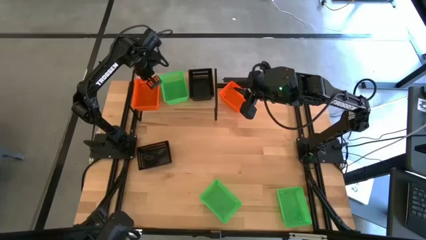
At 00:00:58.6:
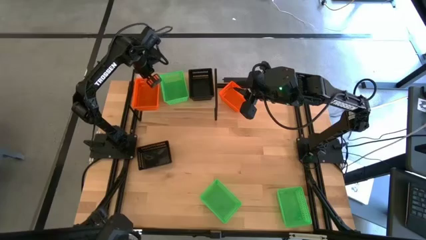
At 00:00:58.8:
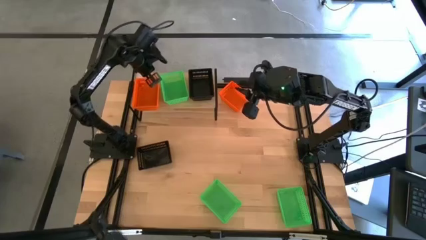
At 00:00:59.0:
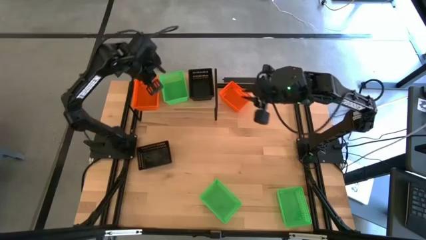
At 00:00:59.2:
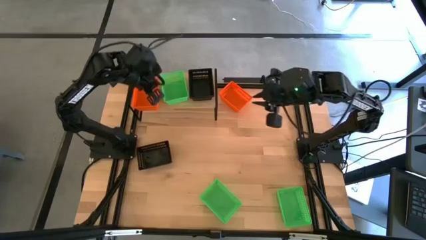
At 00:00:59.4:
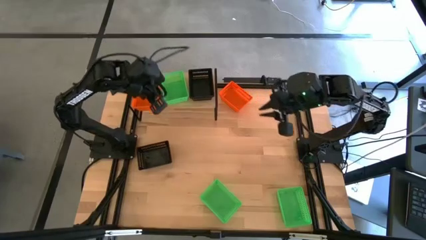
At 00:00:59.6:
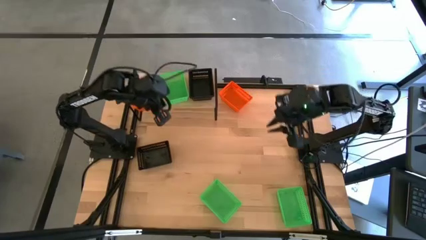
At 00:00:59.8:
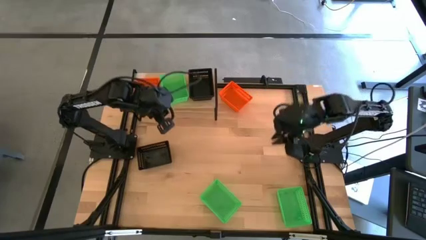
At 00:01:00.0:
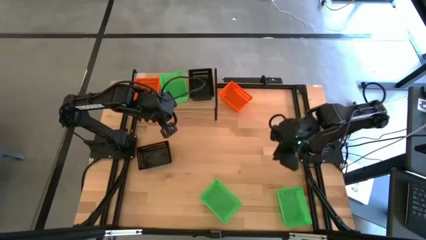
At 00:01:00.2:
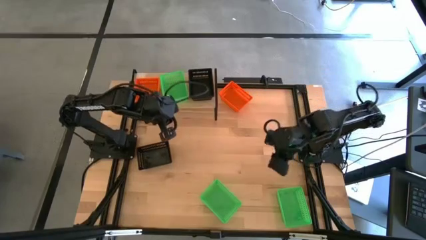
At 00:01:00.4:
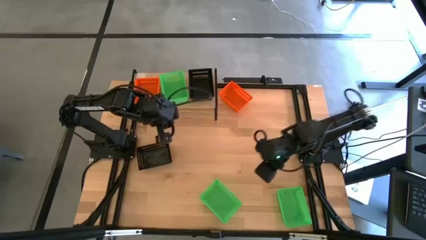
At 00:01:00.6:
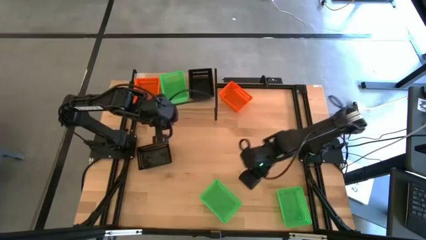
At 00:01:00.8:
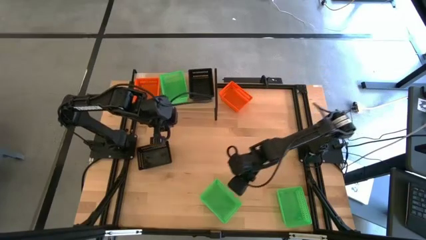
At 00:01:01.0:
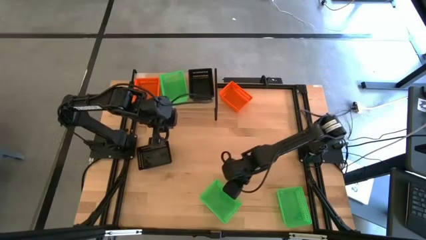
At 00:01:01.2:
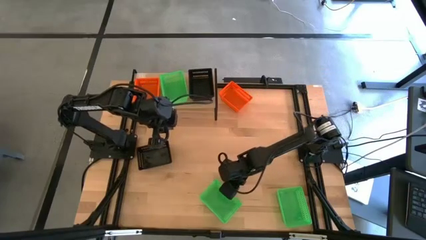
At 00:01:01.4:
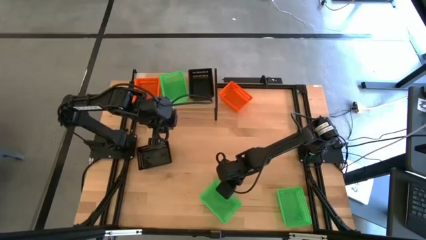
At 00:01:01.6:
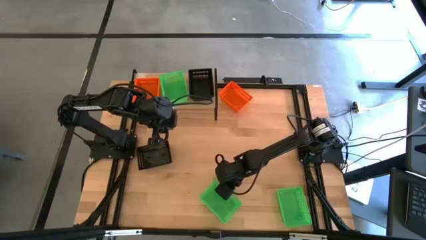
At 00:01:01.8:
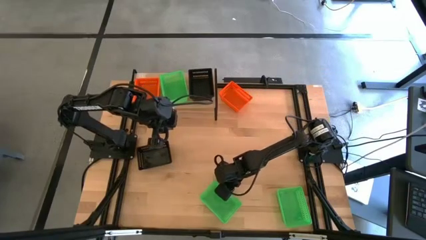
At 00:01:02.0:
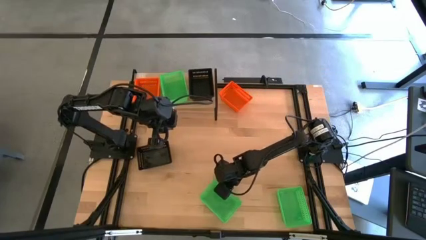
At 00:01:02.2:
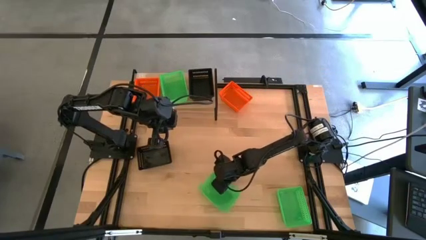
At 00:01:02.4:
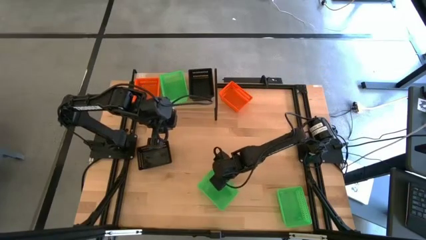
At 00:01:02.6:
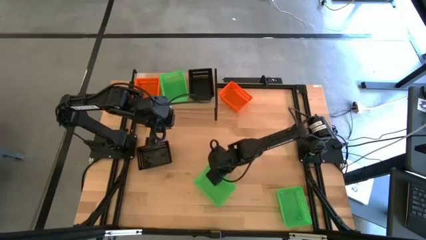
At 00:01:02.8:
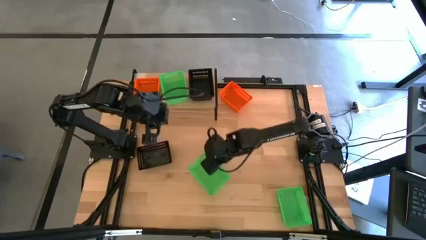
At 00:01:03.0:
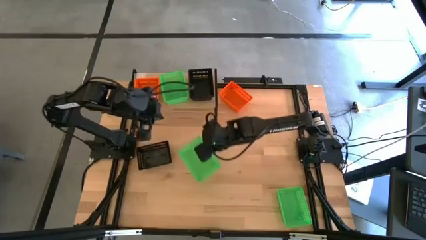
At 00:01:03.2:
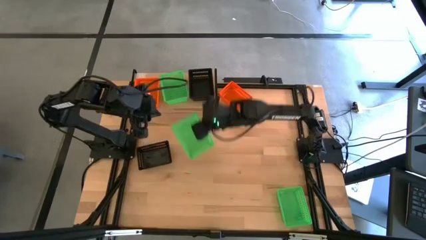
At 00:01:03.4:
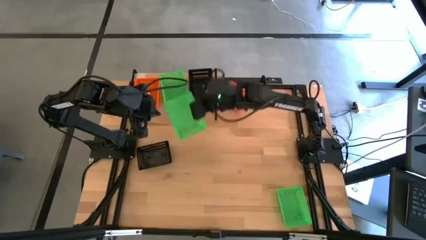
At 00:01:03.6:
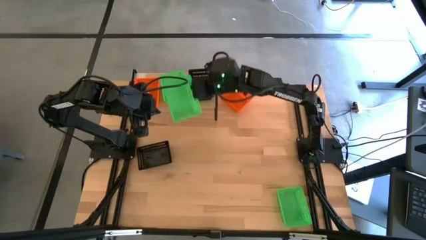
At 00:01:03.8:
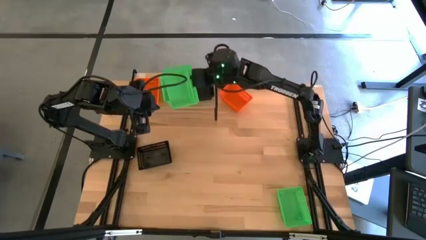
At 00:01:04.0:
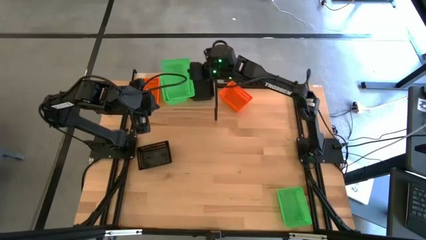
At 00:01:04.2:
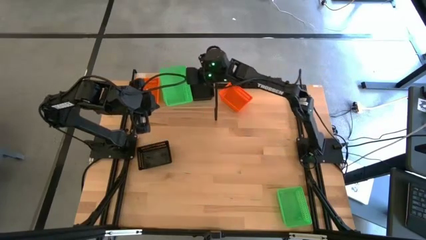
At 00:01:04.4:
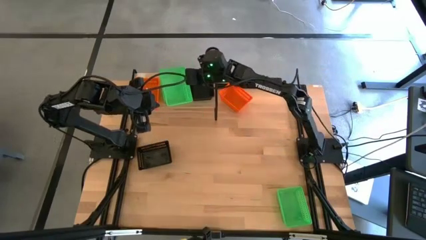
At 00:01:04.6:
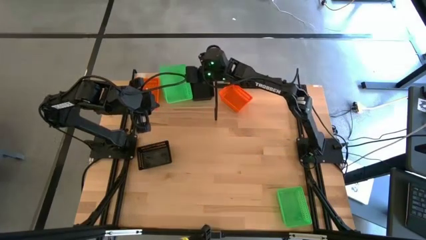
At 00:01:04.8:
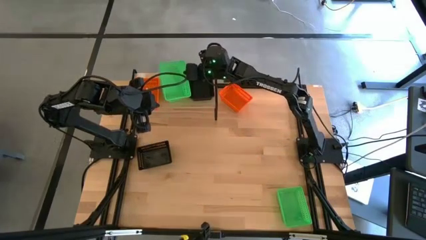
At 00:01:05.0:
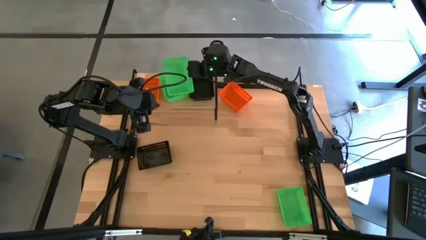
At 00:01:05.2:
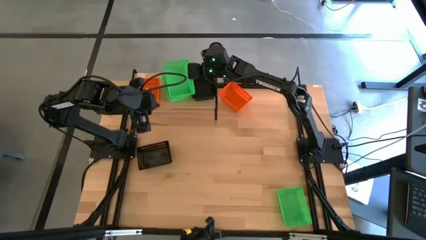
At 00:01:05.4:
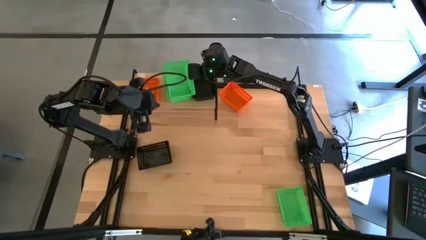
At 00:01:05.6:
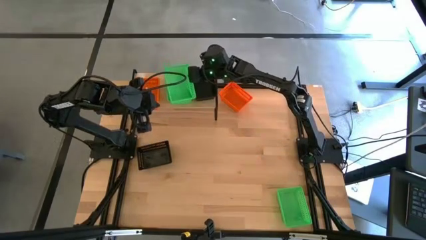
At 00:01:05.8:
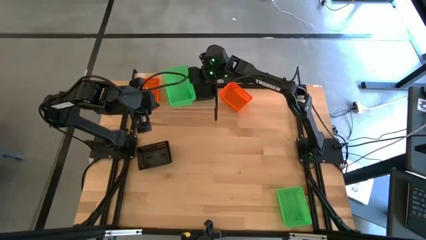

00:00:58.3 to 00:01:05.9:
Task: Stack baskets on shelf by color
Stack the left green bin on the green bin on the shelf

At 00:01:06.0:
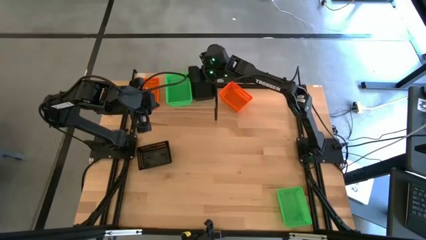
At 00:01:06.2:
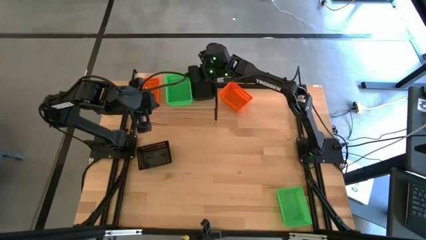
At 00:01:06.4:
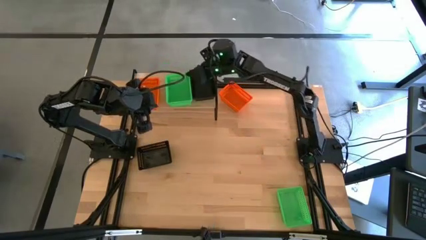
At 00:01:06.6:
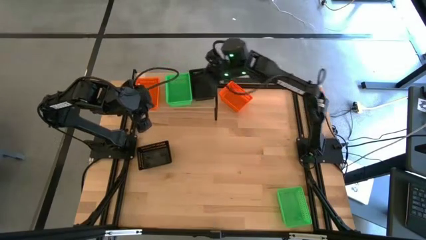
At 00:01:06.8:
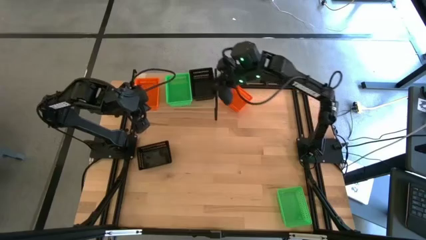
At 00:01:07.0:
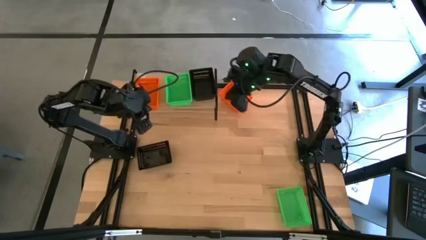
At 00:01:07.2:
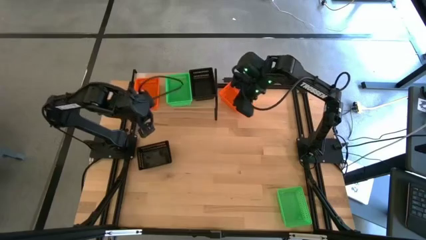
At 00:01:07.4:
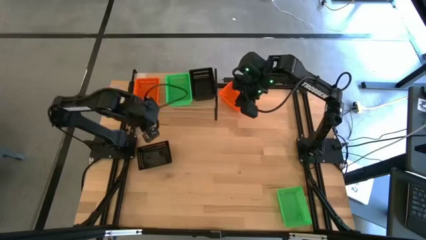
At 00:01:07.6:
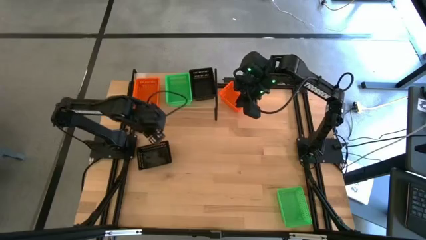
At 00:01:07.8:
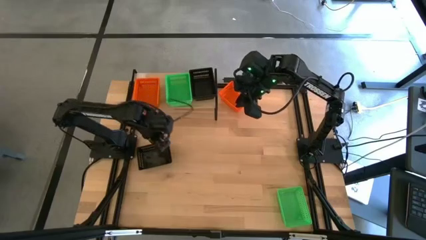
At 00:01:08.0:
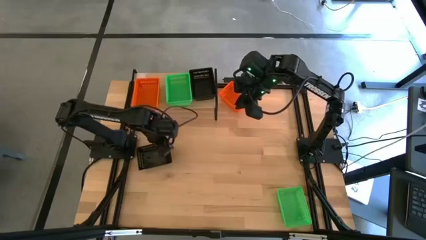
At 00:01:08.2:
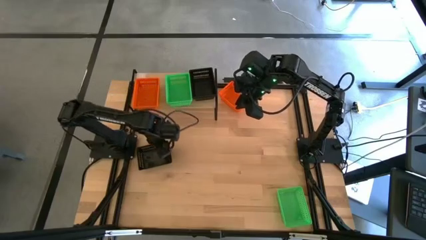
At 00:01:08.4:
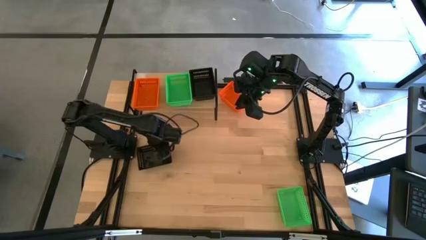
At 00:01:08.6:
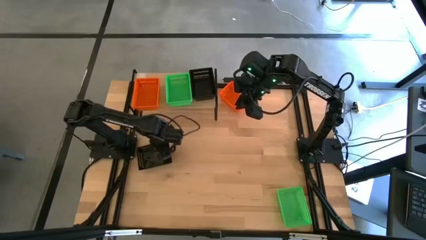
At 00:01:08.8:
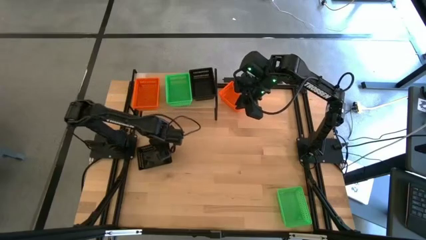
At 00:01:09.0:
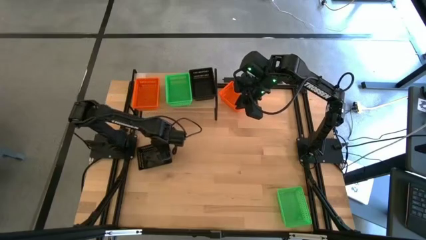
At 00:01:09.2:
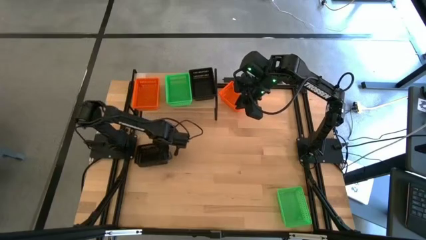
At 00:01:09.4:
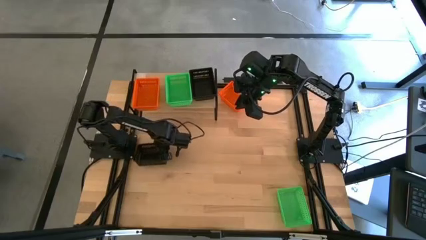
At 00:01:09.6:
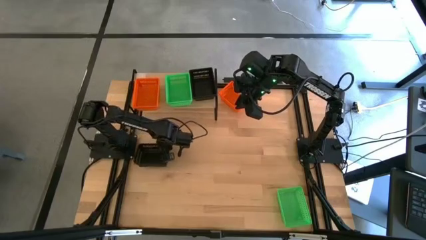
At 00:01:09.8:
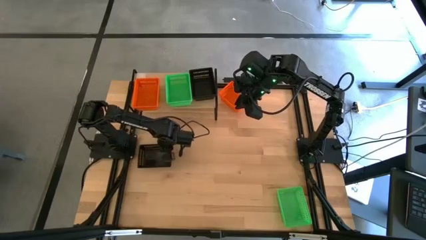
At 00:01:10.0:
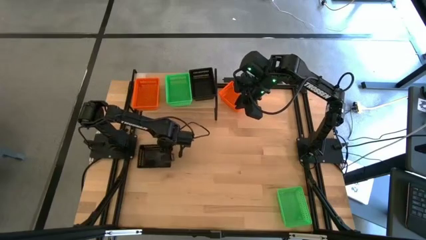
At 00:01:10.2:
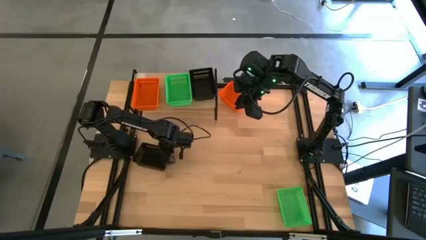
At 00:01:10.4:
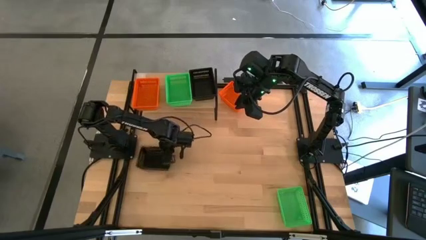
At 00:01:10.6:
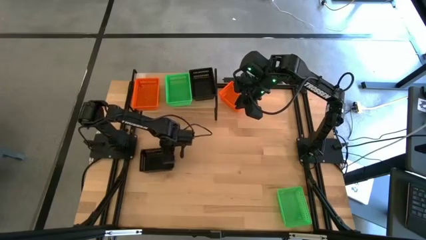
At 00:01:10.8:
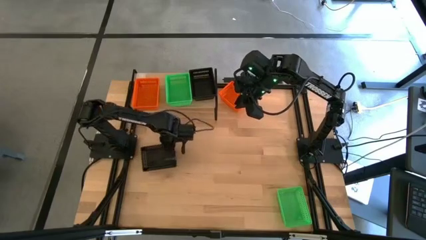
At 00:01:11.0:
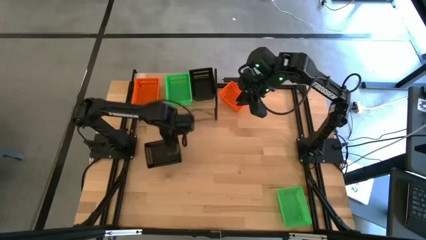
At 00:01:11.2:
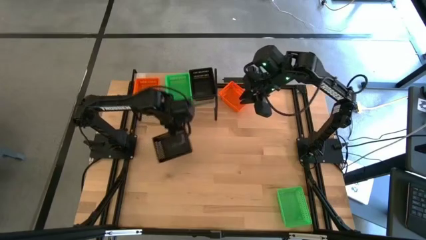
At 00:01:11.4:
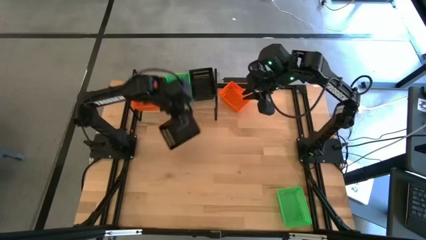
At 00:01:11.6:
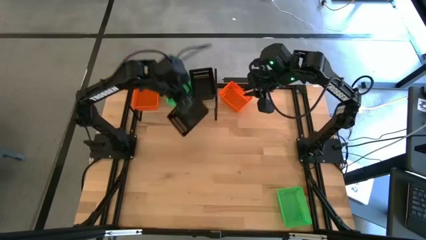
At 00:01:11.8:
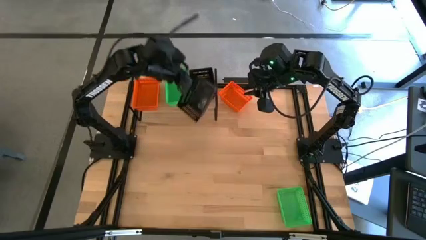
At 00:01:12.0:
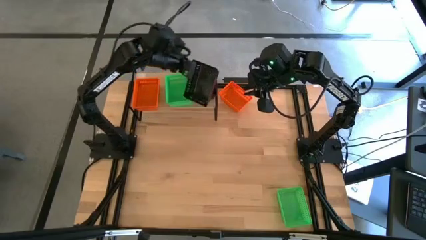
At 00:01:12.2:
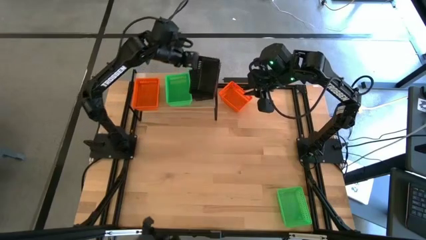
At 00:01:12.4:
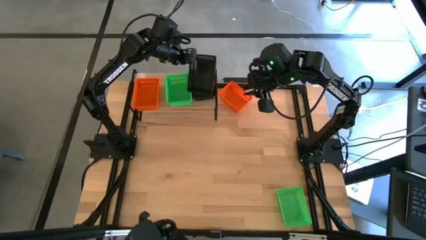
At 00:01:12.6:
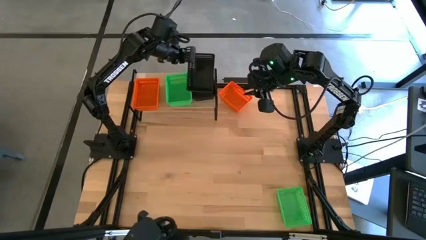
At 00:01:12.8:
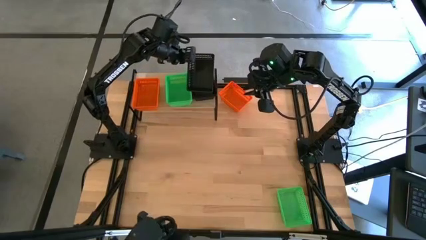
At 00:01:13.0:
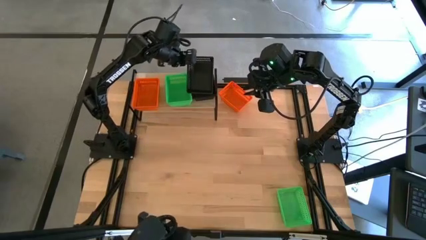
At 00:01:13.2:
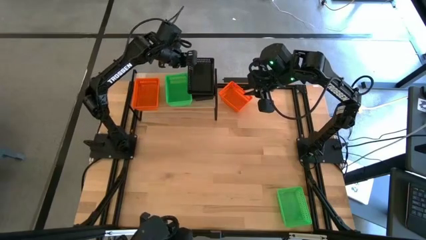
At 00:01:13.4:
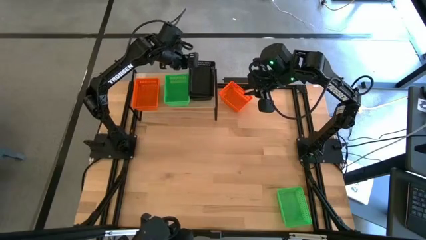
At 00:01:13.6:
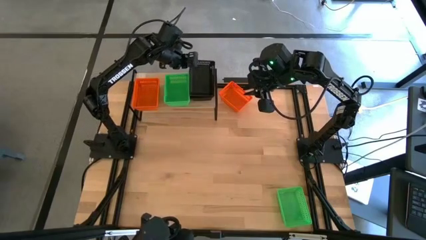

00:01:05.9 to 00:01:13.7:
Stack the black bin on the black bins on the shelf
